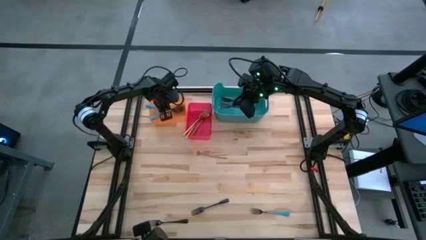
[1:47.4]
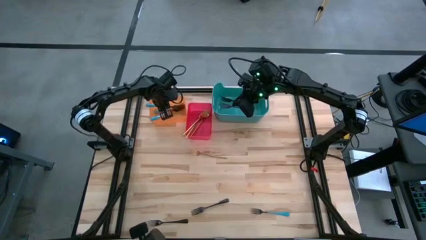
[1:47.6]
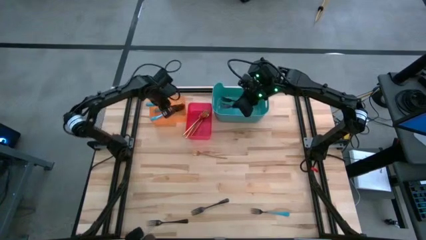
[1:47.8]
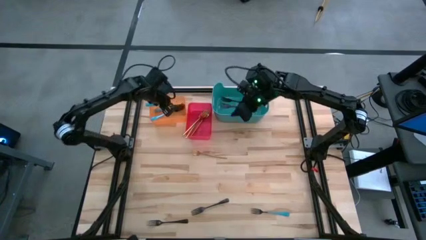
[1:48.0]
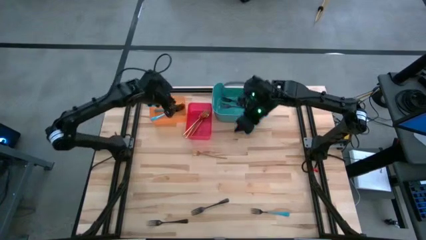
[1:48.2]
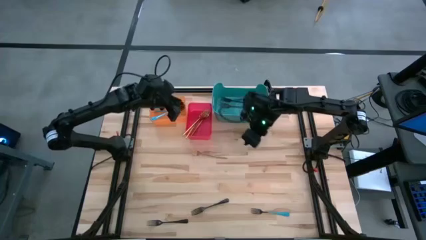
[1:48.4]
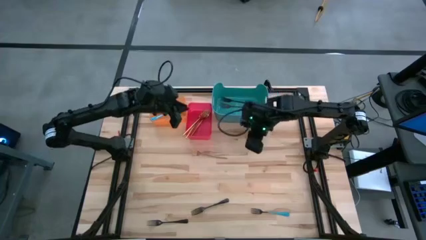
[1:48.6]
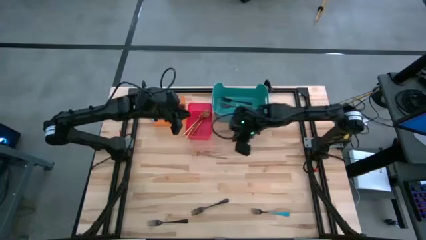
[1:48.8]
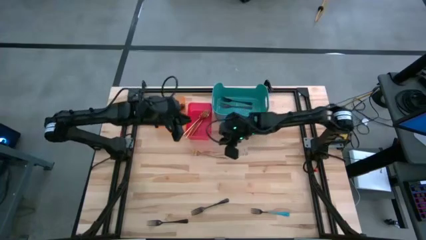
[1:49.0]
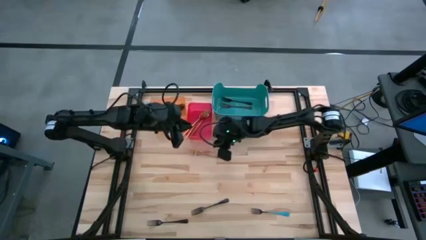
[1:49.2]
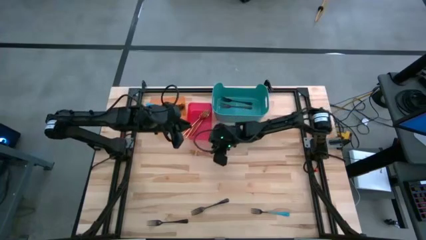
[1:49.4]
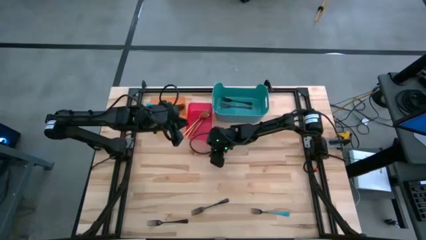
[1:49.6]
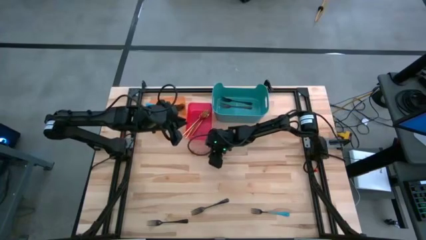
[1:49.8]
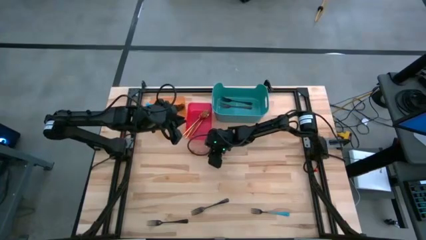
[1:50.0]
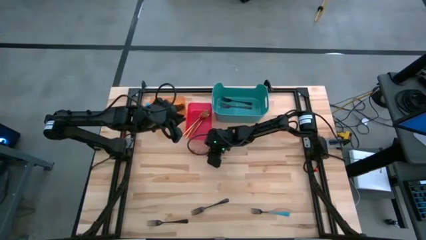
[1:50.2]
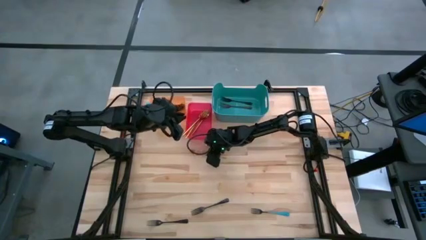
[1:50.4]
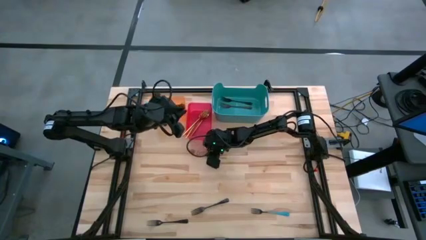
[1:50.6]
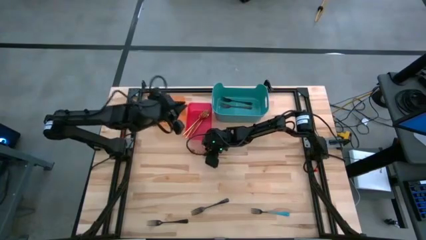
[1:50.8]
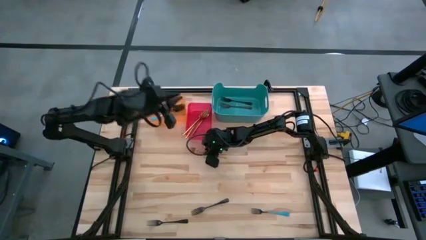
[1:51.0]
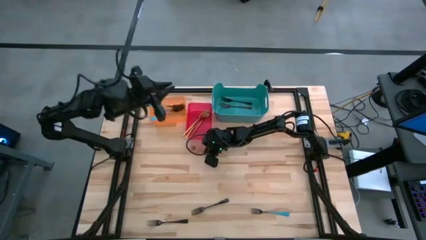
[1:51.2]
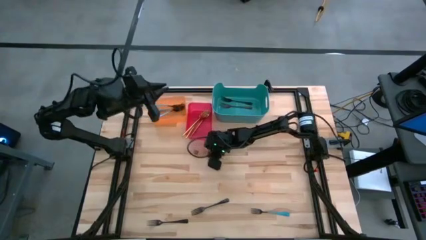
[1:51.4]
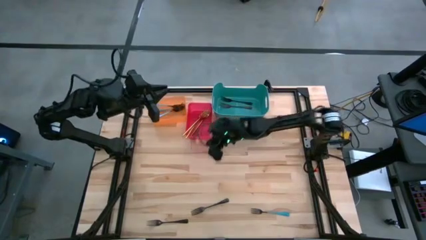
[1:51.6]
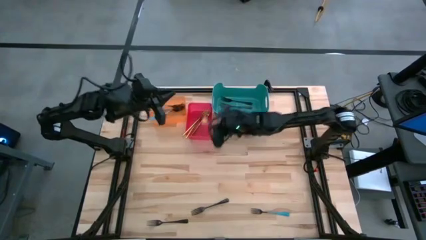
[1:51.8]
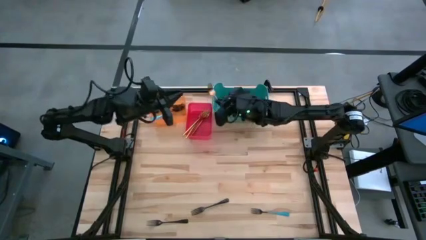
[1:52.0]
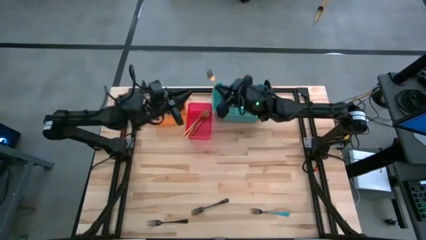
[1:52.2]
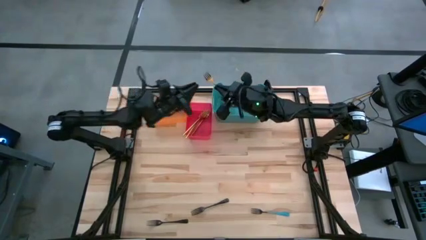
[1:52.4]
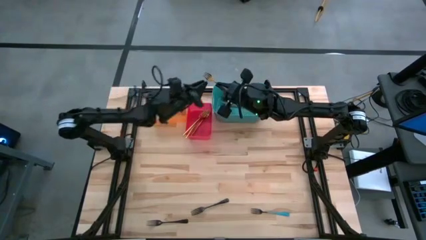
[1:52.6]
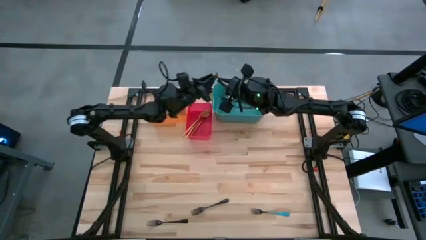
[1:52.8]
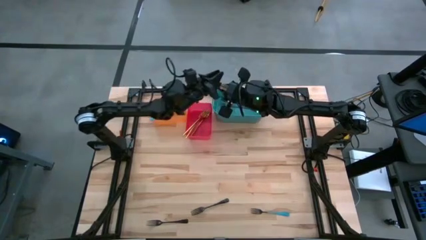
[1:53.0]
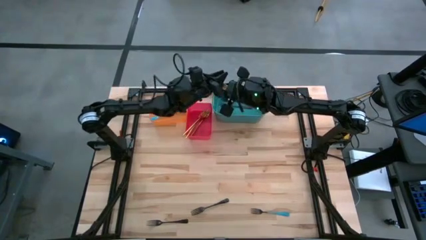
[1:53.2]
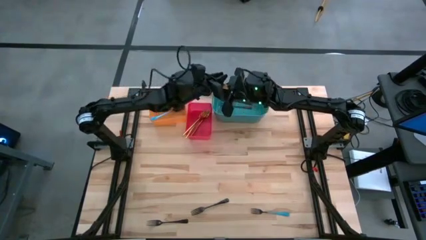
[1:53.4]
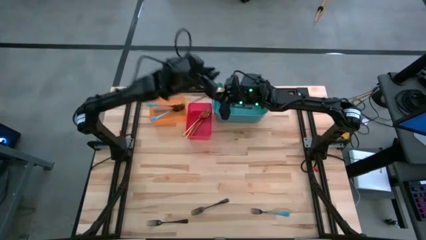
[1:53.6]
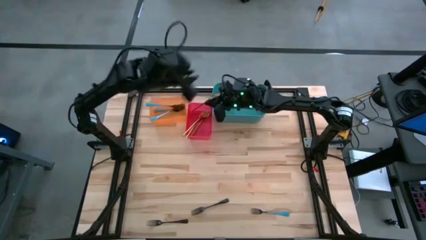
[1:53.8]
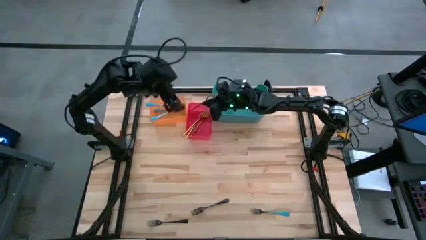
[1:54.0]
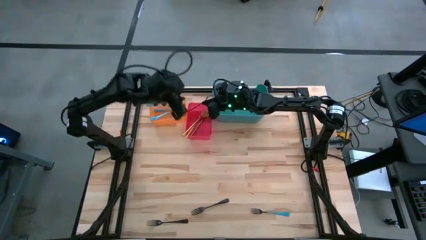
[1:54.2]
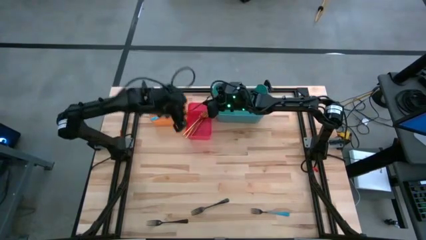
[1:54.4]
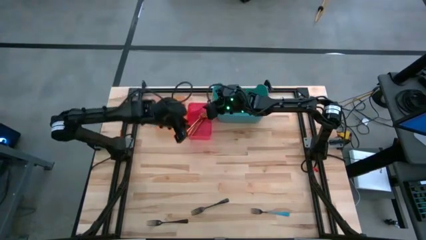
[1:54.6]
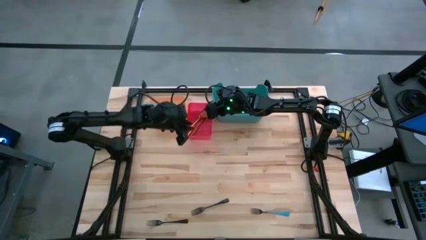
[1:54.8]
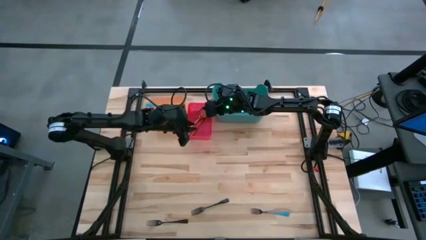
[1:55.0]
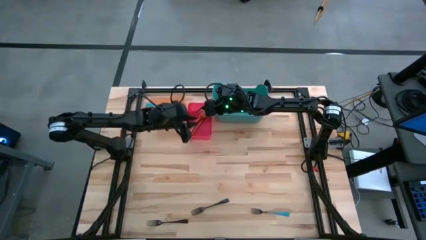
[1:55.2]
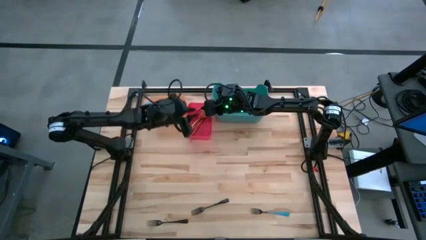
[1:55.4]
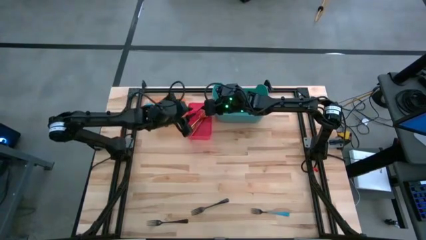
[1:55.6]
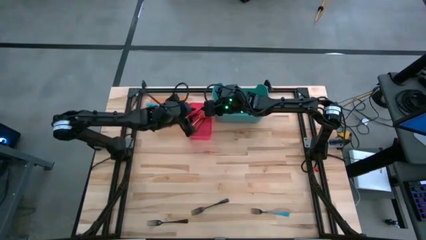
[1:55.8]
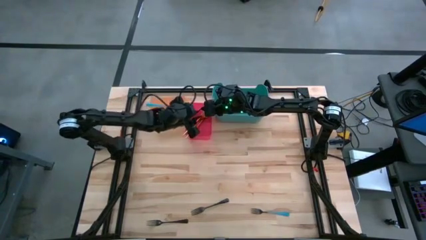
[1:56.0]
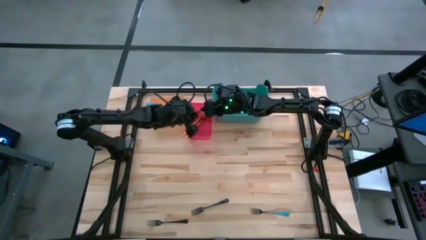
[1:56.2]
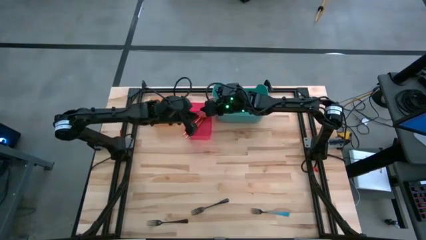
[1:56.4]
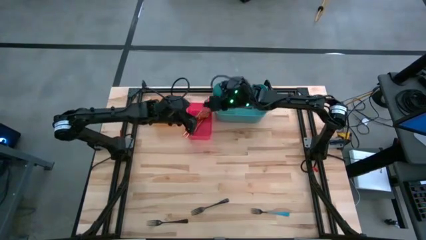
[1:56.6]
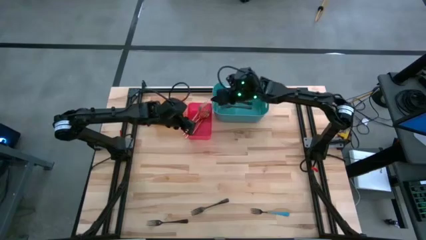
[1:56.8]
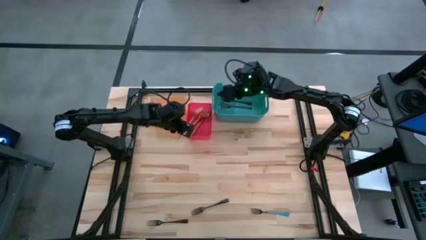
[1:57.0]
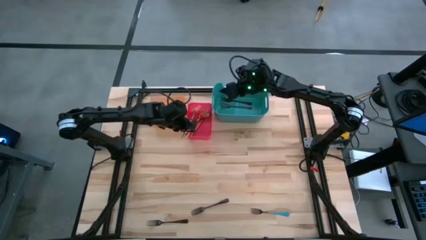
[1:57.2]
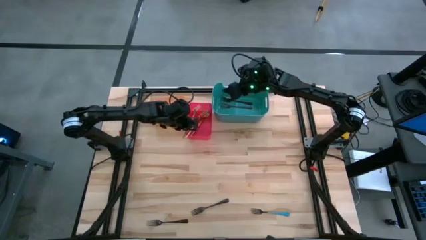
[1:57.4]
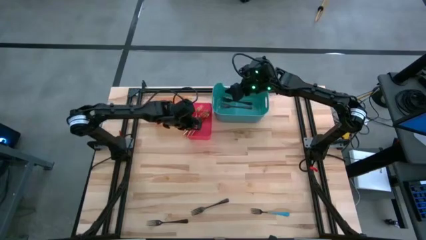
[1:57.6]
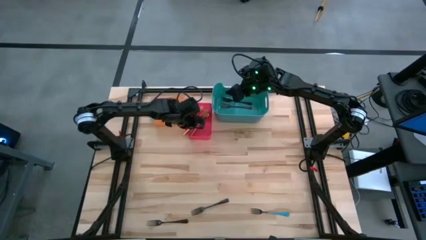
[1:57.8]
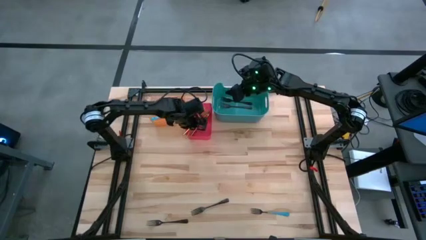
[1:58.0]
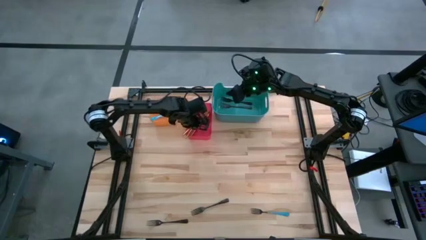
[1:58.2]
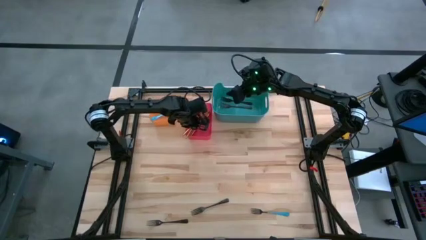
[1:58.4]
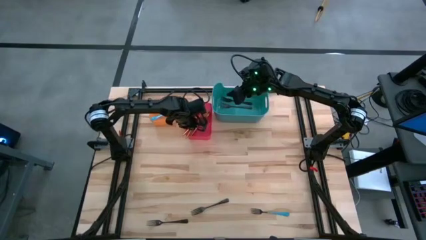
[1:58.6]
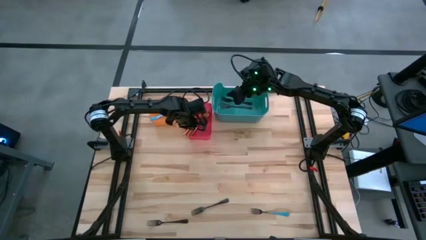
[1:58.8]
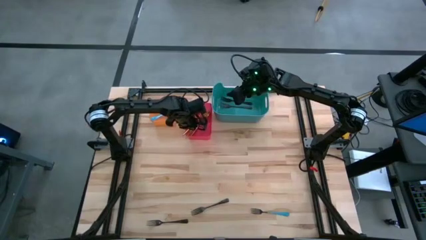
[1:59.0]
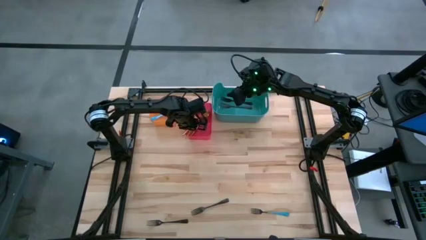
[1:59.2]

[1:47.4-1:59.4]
Task: Sort silverware by color (type)
Put the gold fork into the red bin
